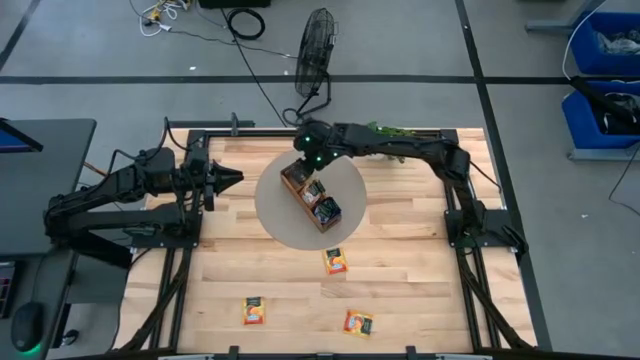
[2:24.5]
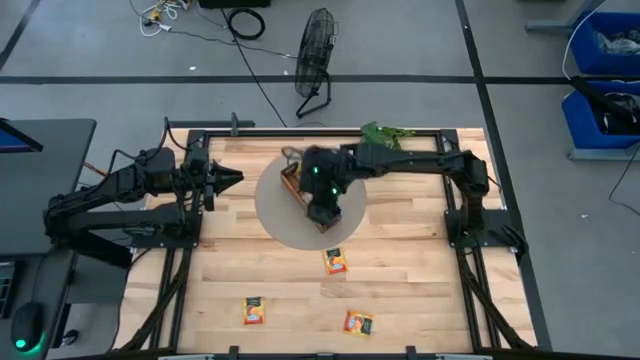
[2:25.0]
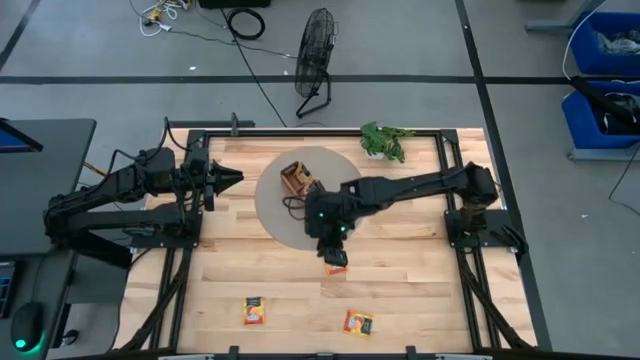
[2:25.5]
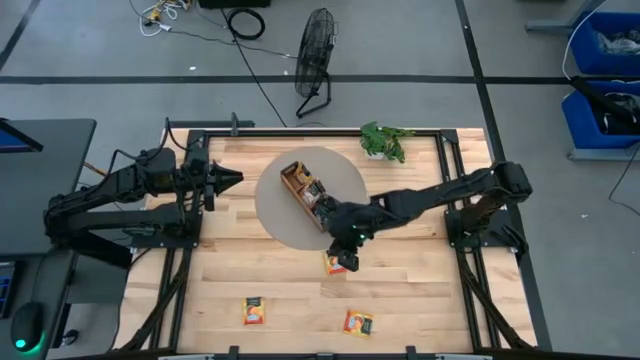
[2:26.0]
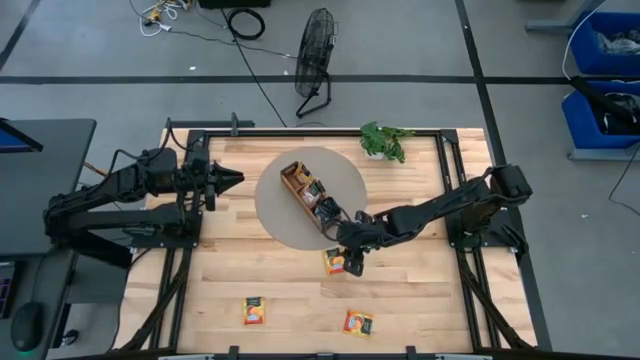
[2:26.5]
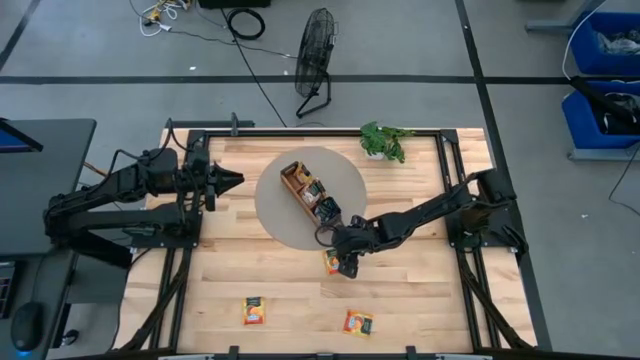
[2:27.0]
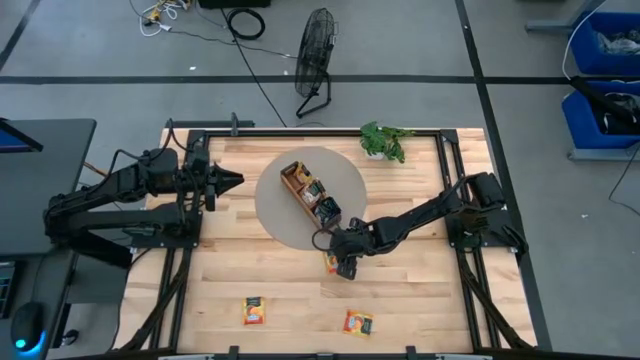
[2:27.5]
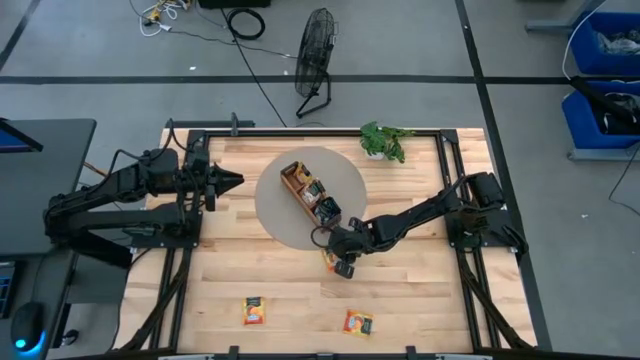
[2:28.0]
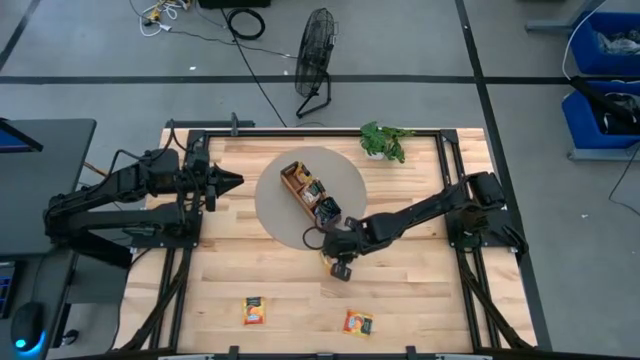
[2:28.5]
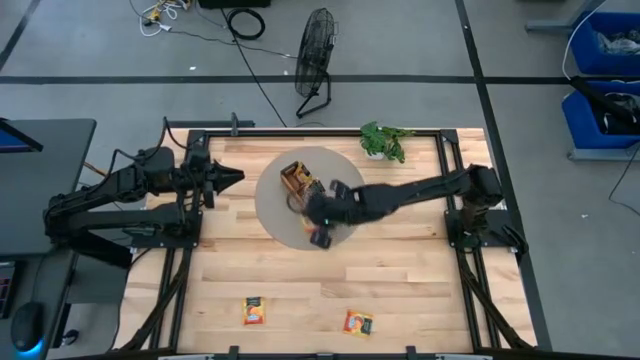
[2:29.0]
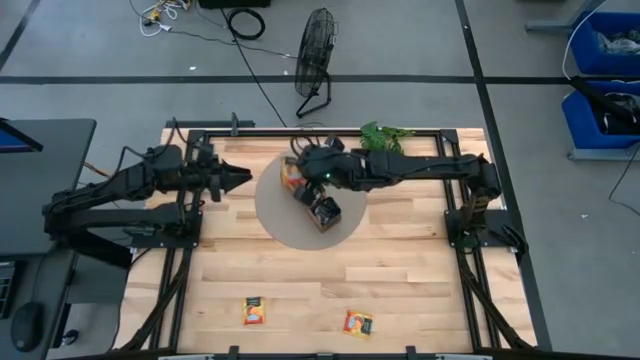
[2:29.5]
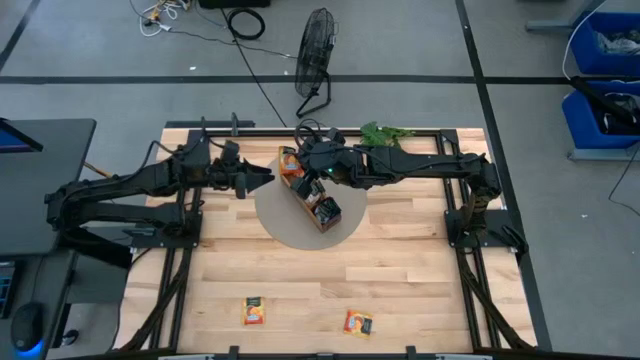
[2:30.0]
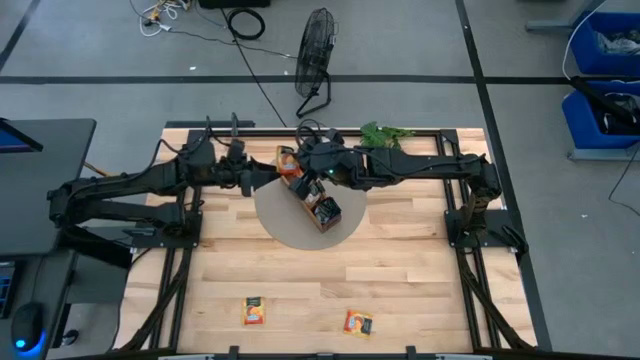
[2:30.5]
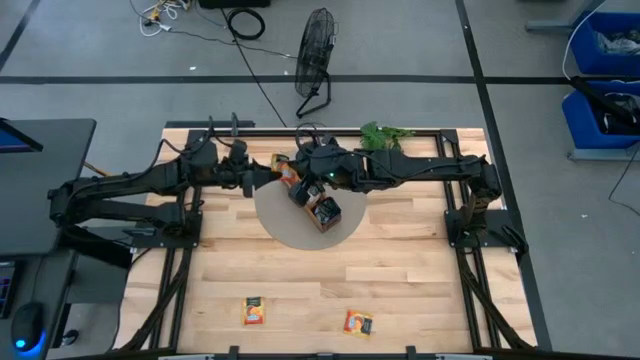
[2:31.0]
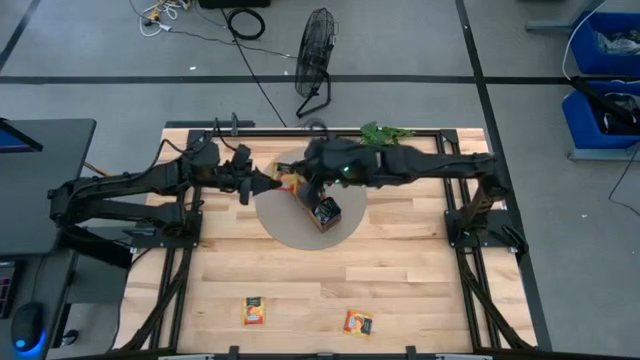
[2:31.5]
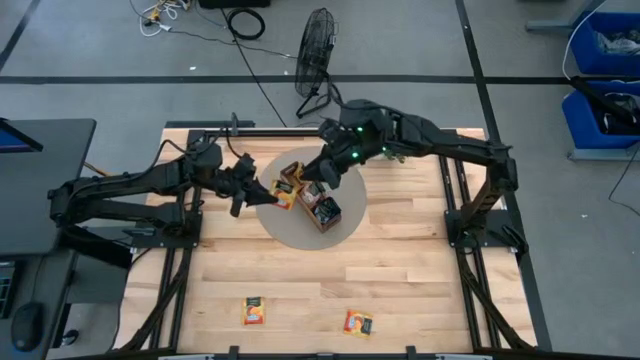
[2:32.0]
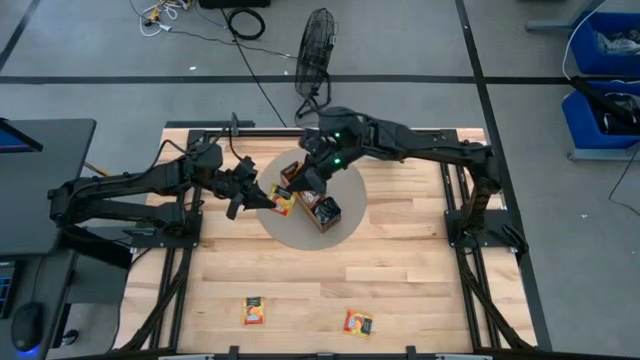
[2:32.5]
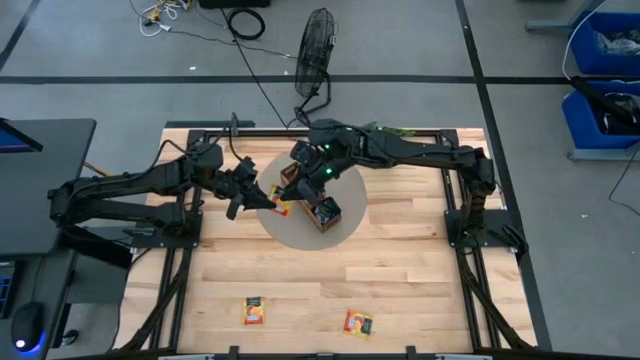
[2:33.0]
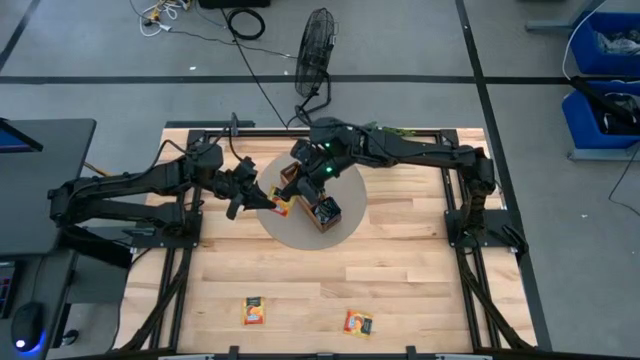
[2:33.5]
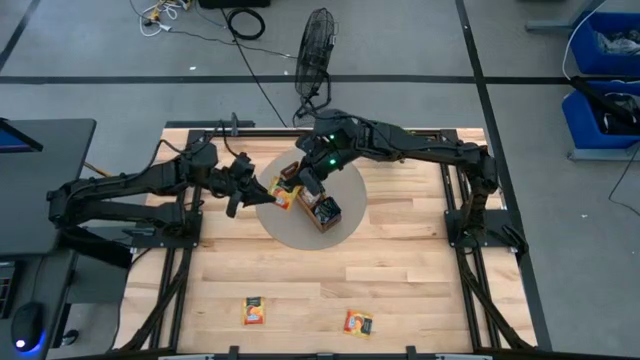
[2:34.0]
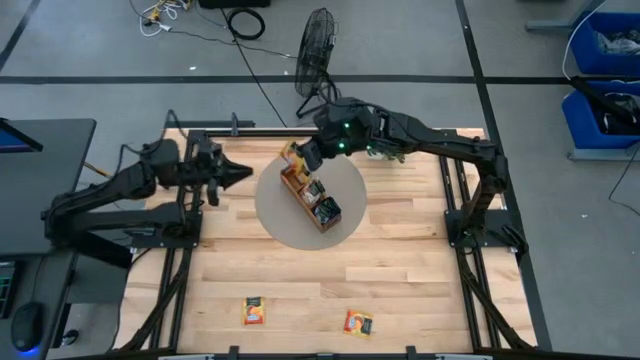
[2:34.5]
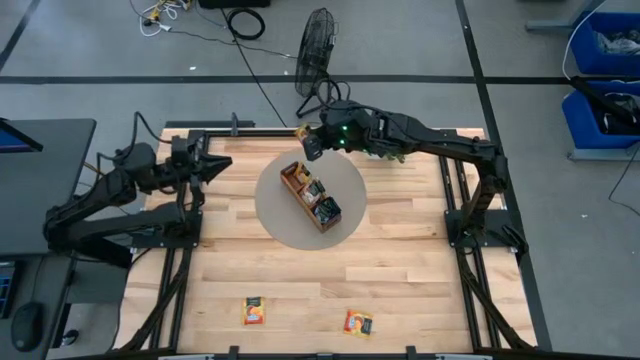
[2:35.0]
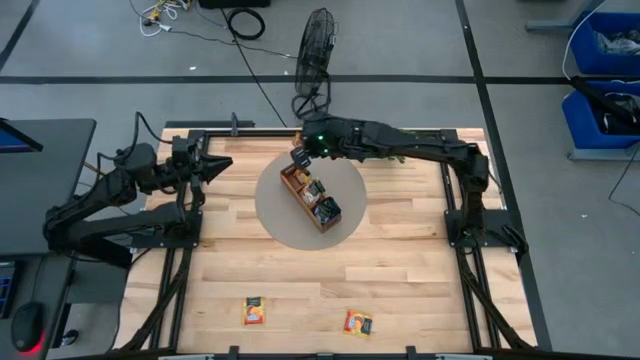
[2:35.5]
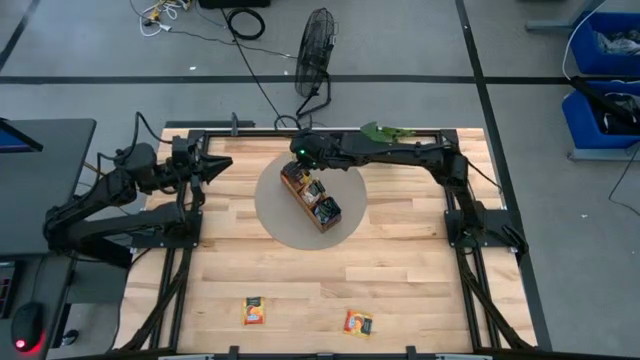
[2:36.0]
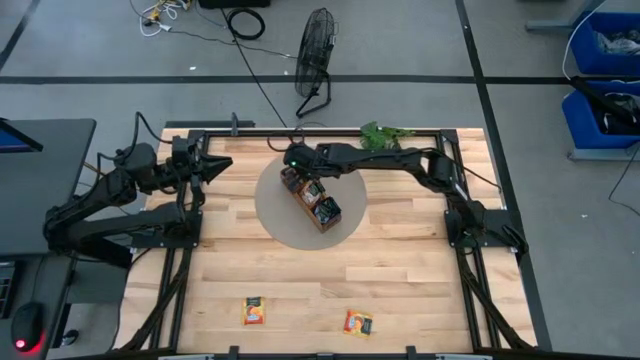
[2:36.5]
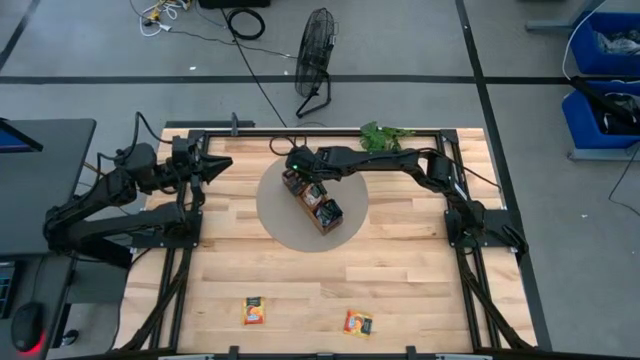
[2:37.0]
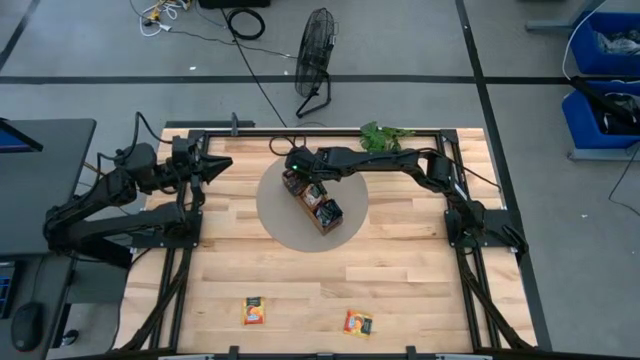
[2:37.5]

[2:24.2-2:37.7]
Task: Pick & Place Tea
Put the yellow tea bag into the left section of the wooden organizer

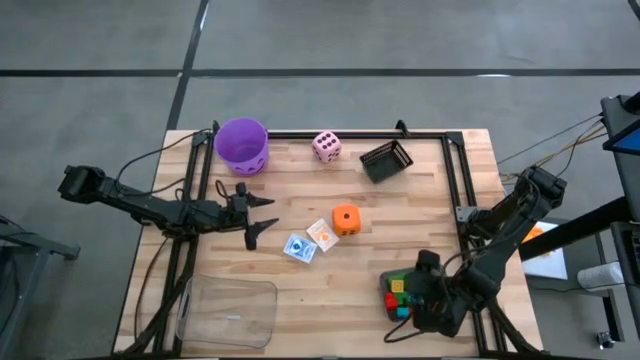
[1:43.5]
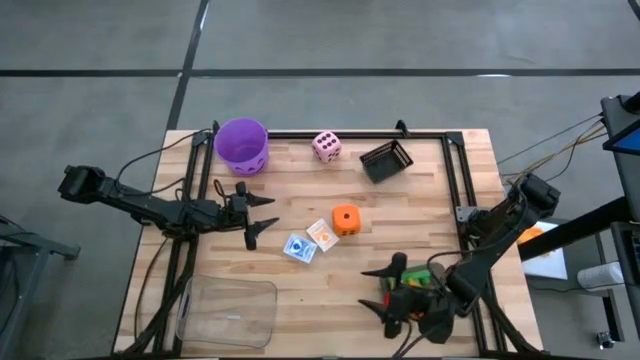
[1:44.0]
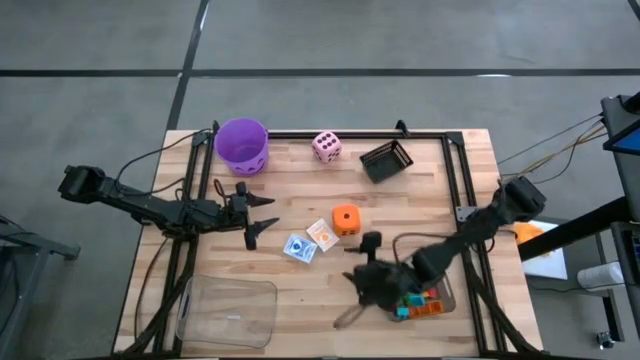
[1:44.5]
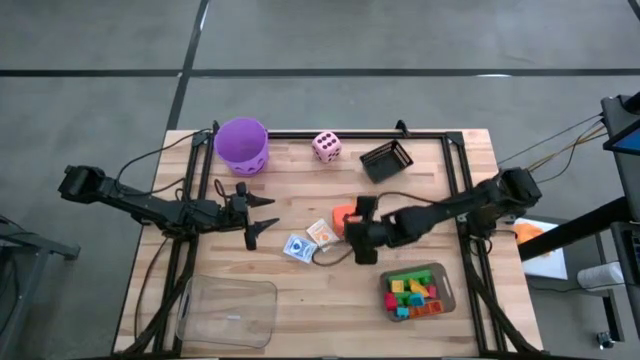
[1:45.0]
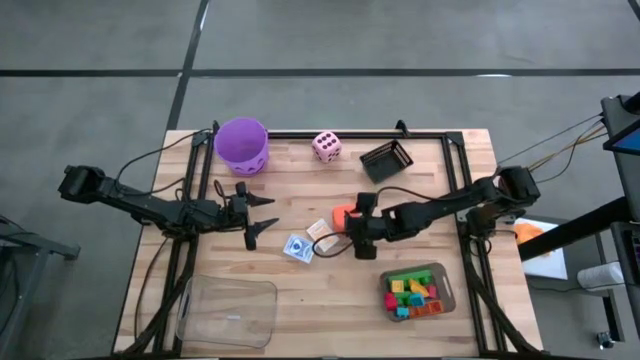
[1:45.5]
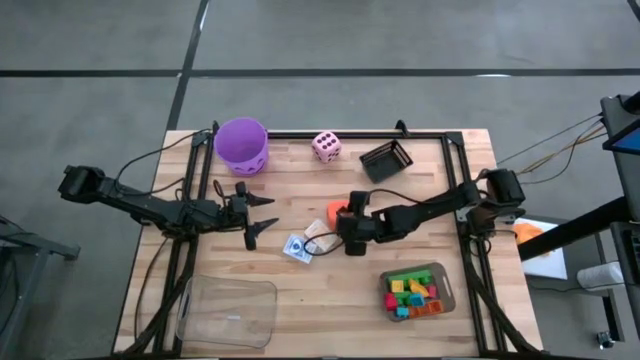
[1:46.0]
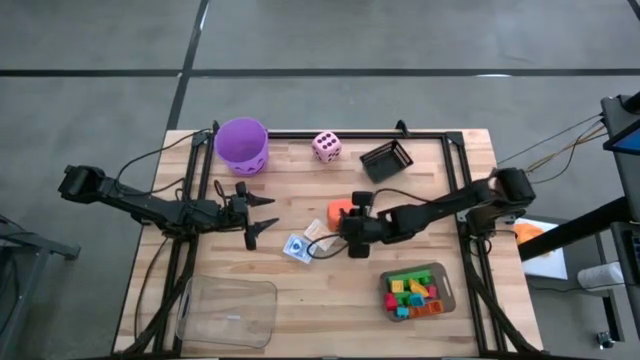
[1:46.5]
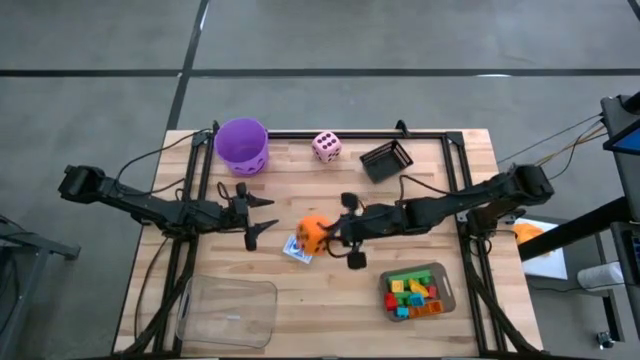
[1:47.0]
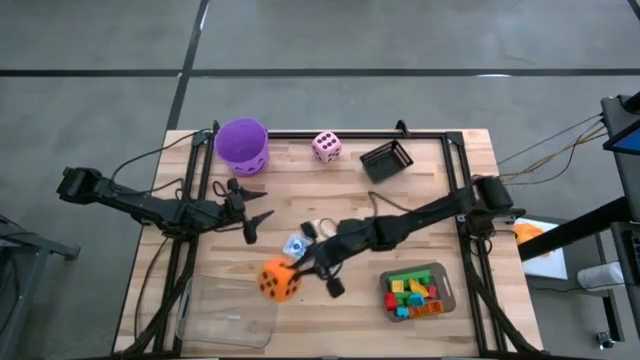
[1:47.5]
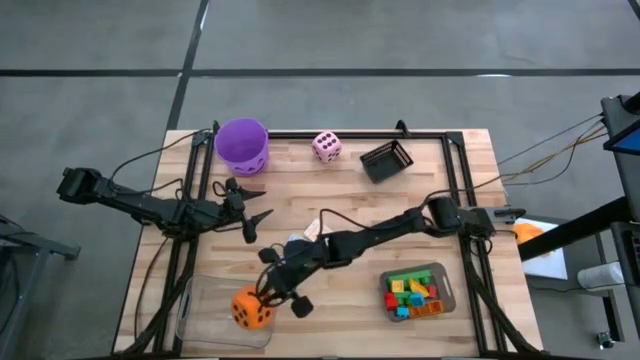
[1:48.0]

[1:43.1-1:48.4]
Task: Pick & Place Toys
Put the orange dice into the transparent bin

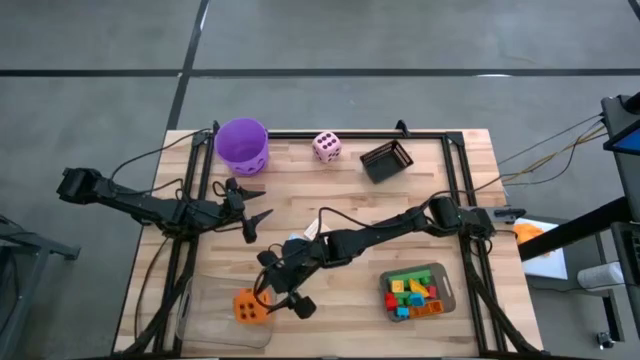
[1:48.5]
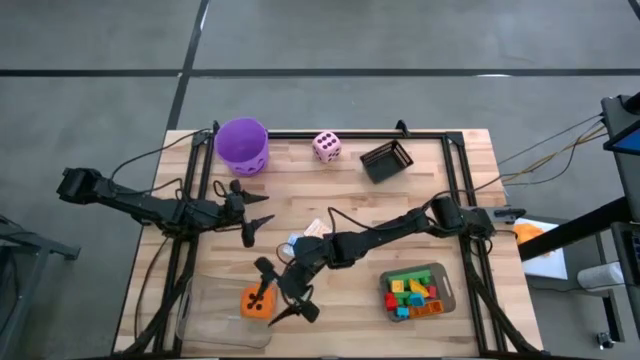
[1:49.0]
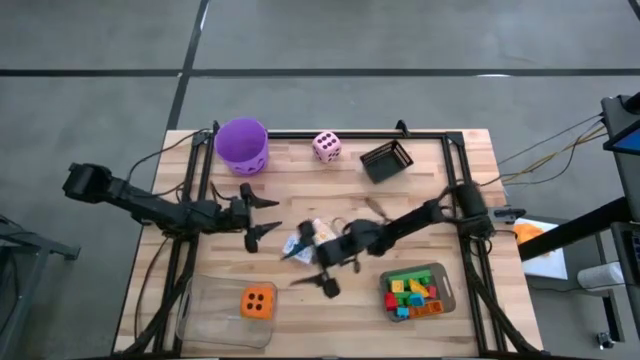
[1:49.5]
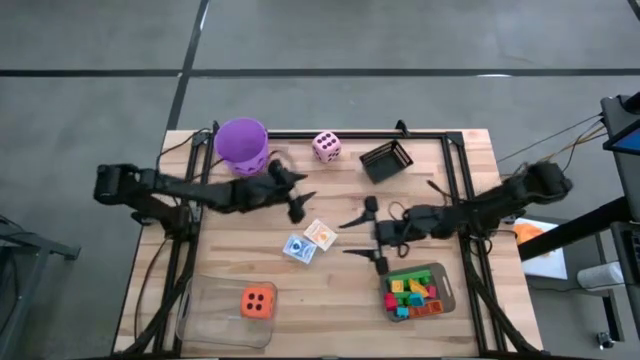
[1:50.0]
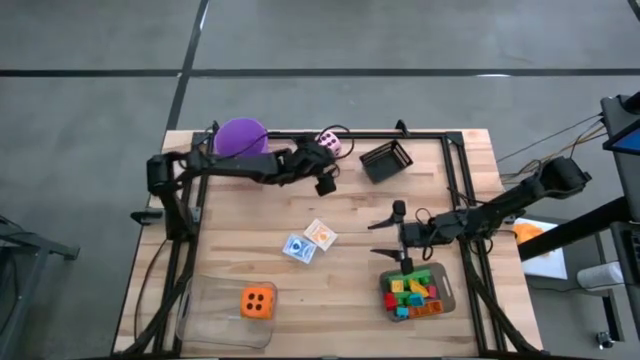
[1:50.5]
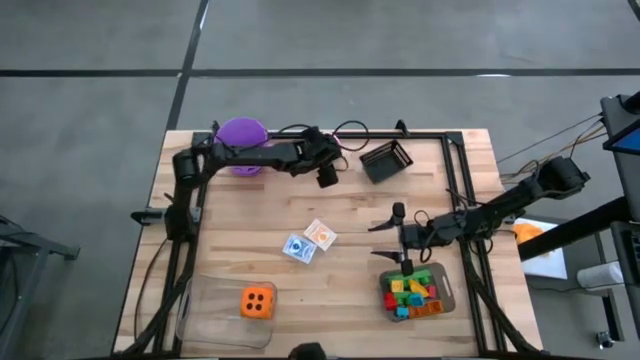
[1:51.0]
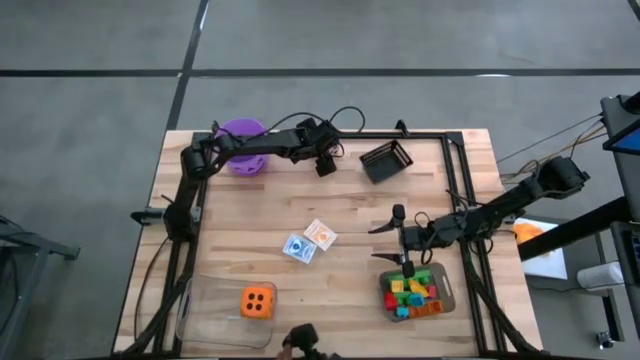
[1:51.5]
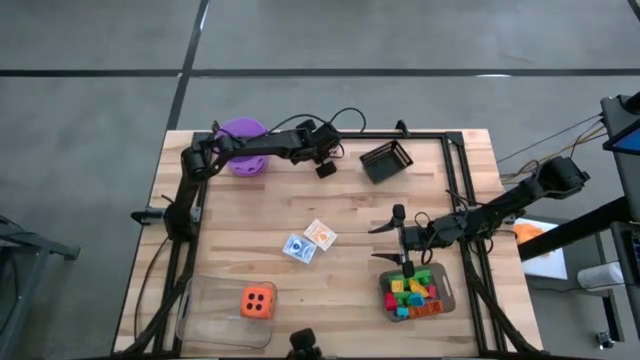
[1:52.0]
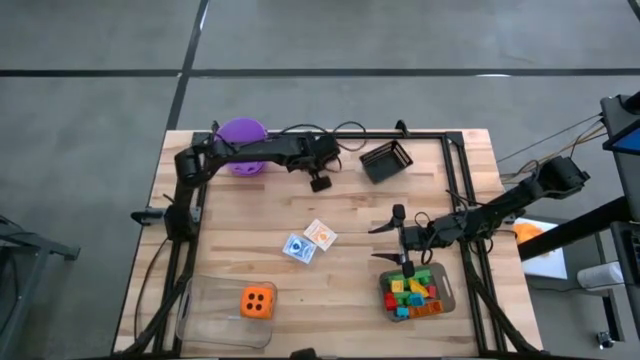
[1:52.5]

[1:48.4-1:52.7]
Put the pink dice into the transparent bin
